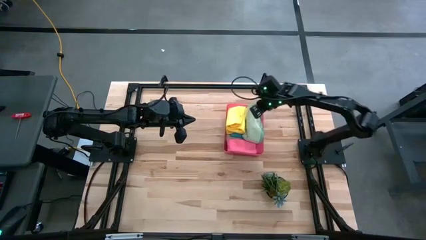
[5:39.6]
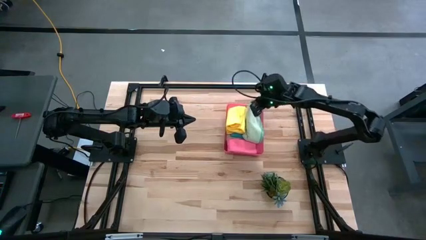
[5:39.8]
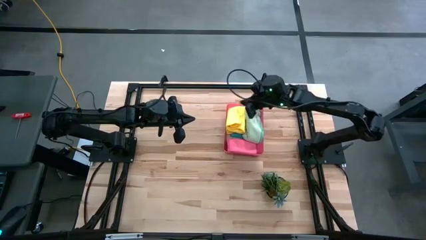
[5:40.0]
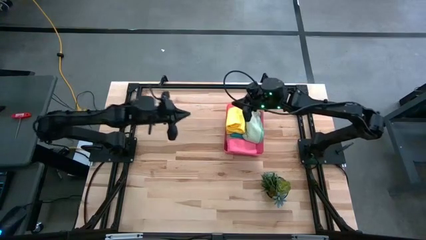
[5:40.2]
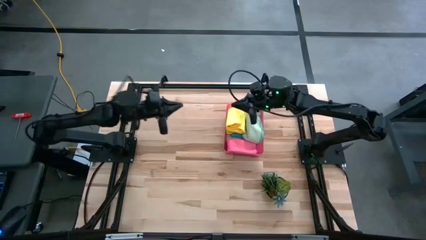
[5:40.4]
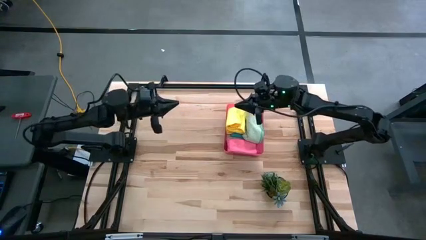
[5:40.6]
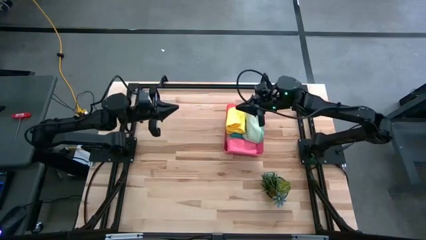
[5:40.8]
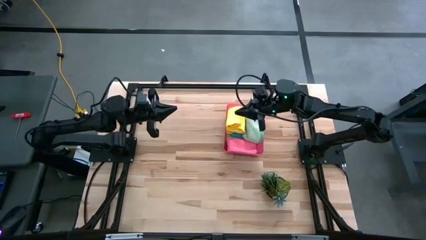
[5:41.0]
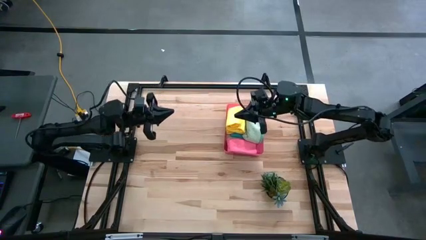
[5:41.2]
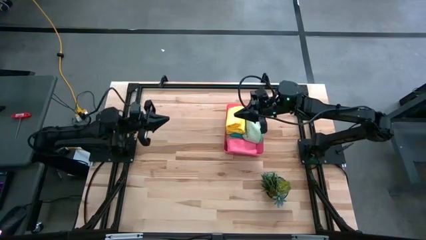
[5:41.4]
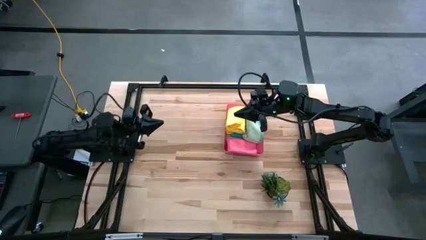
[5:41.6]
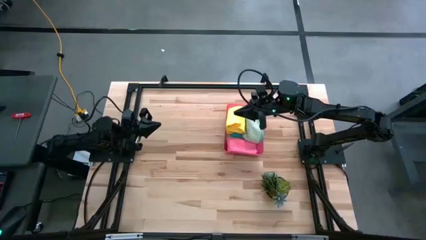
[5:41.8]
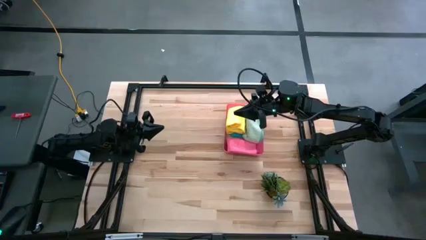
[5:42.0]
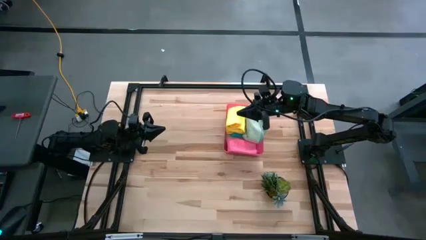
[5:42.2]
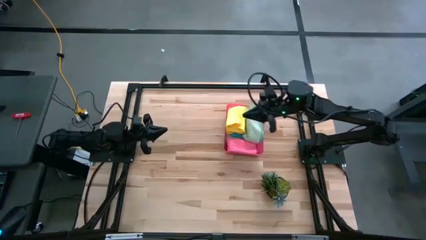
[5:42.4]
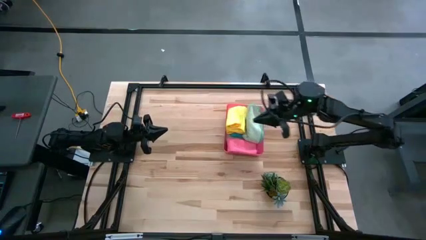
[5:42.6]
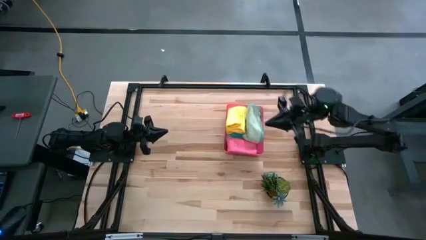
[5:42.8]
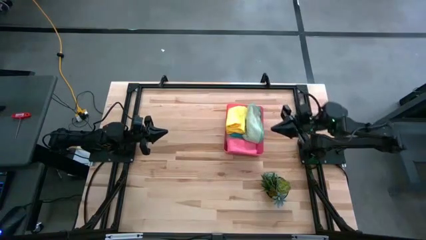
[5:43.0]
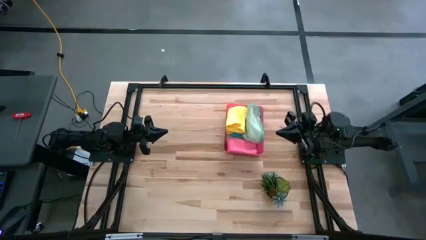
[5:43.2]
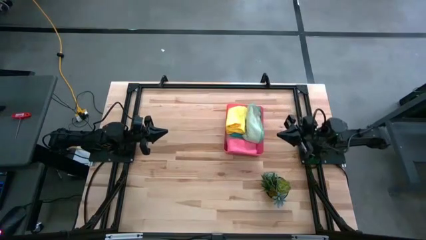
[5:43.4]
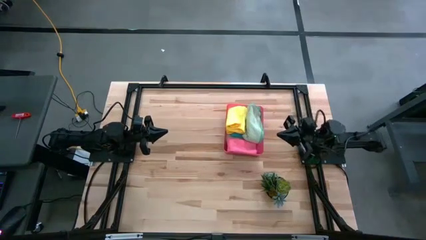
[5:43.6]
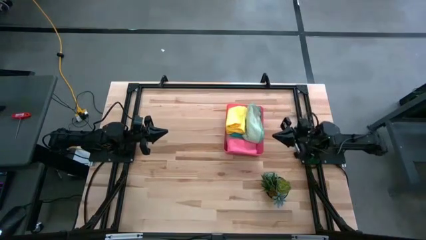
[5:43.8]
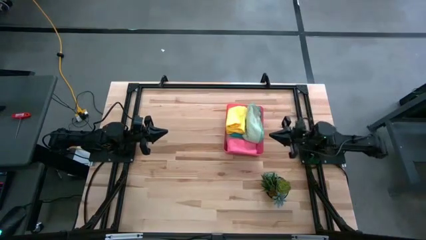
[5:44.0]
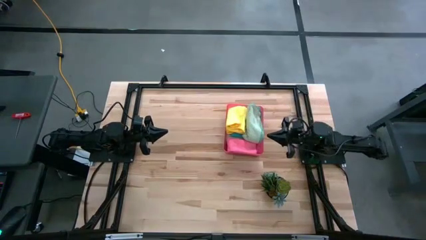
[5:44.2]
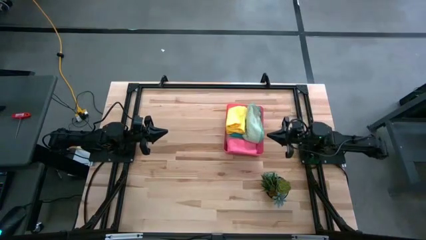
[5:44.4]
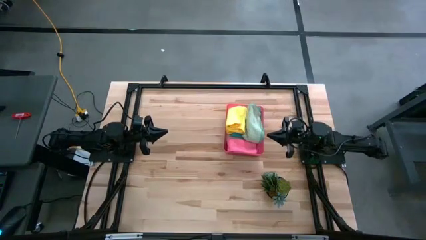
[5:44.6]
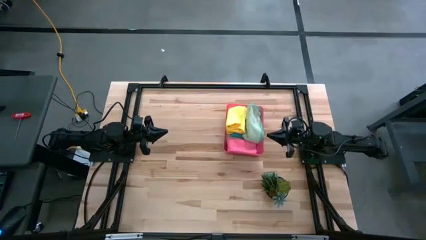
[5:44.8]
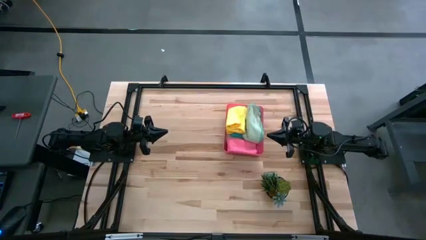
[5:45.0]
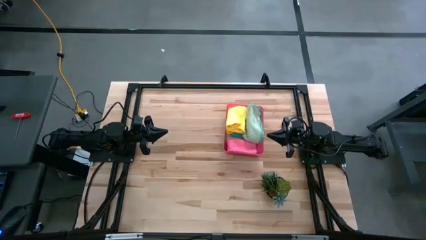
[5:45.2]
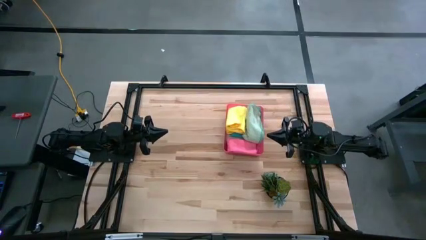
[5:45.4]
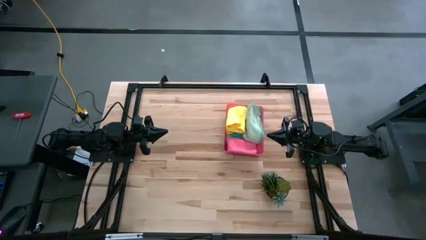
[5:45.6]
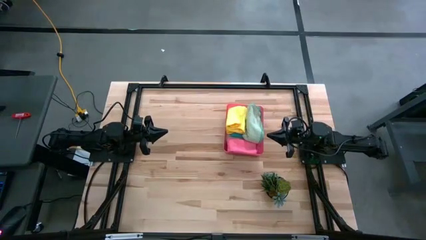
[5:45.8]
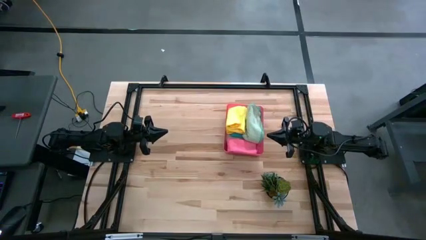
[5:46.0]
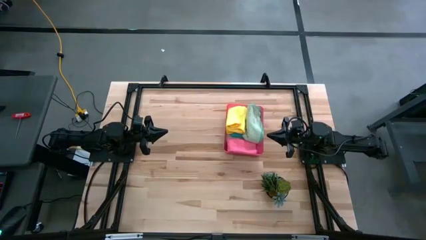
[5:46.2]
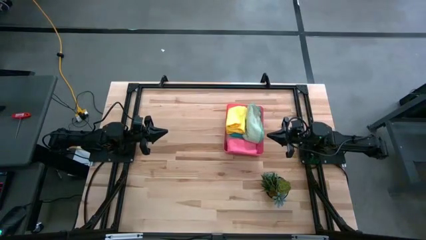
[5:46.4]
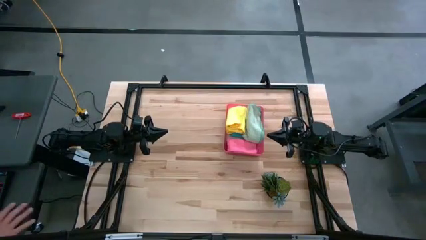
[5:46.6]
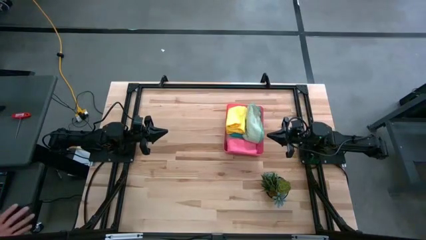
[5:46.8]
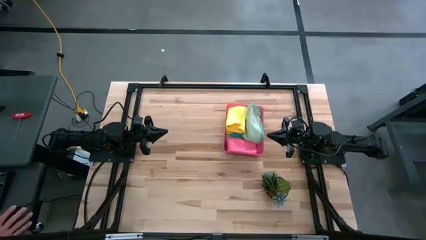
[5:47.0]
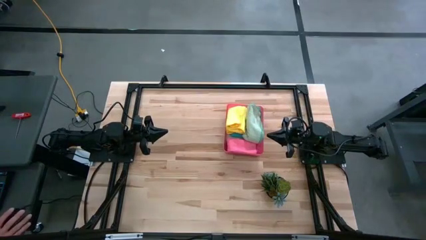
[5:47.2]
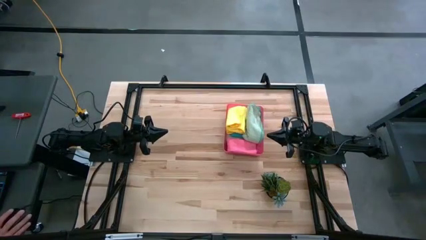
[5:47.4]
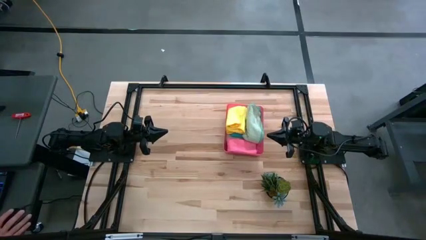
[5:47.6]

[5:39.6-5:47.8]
Task: Fold microfiber towels
Return to Home position

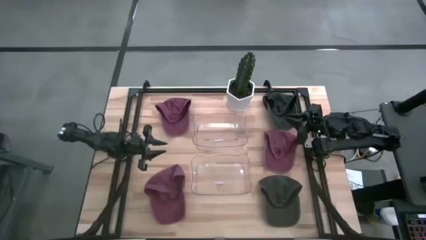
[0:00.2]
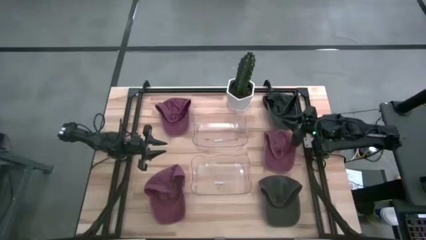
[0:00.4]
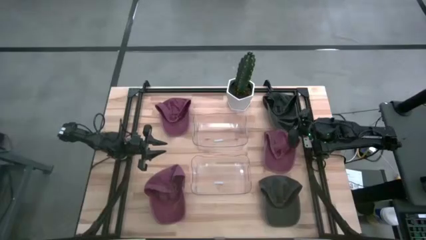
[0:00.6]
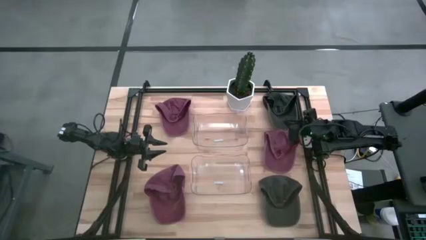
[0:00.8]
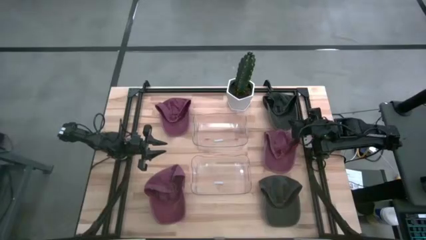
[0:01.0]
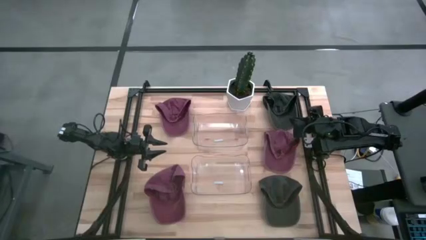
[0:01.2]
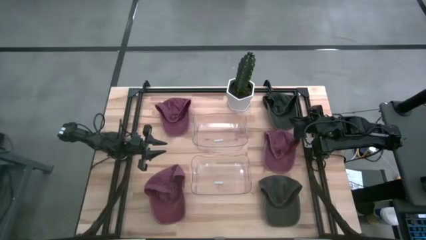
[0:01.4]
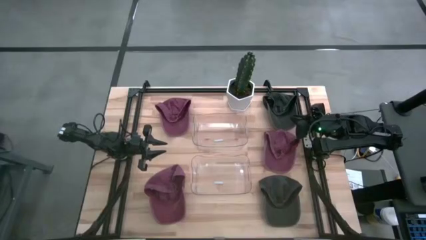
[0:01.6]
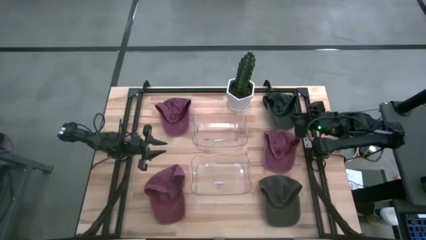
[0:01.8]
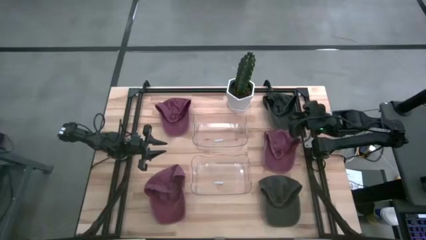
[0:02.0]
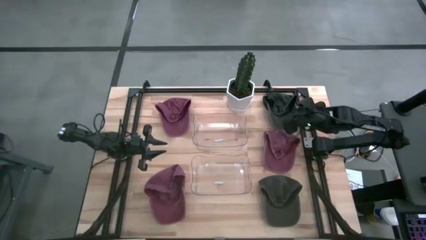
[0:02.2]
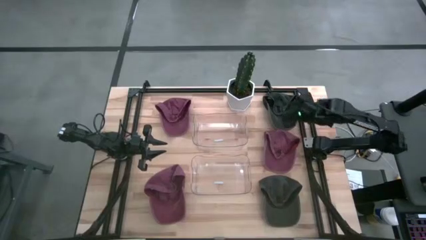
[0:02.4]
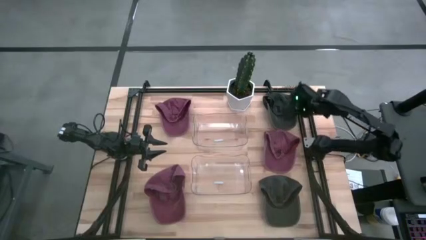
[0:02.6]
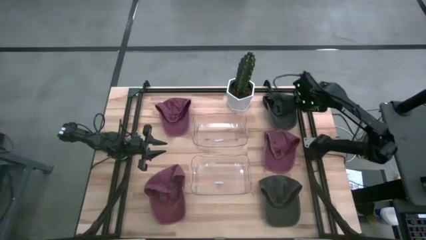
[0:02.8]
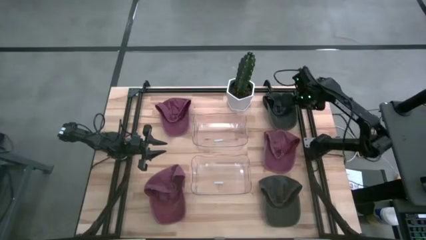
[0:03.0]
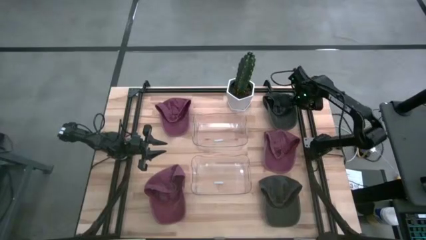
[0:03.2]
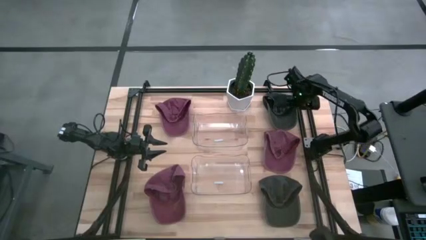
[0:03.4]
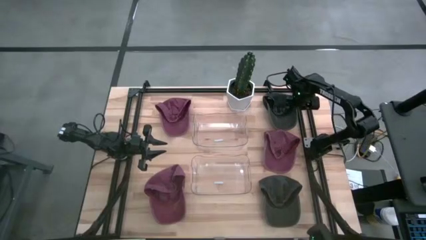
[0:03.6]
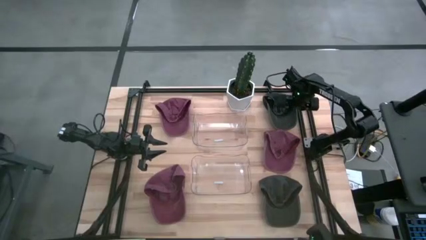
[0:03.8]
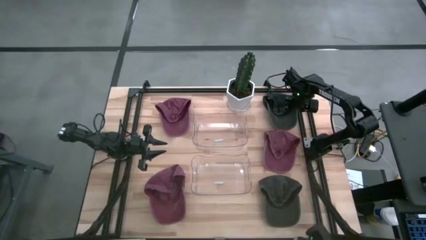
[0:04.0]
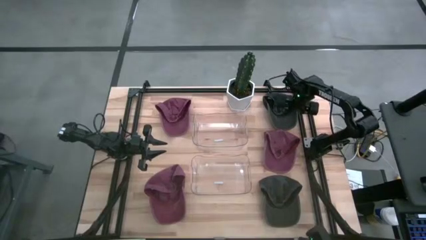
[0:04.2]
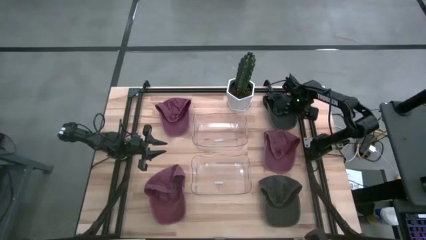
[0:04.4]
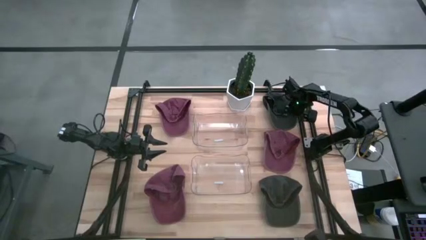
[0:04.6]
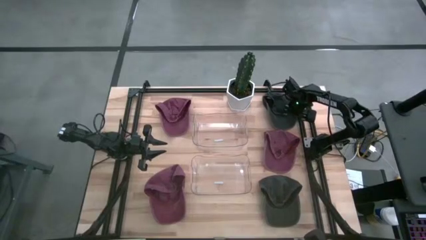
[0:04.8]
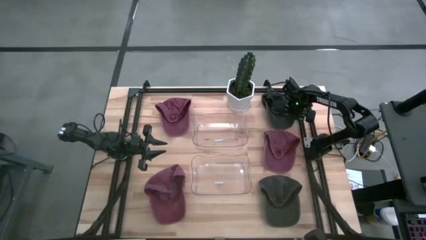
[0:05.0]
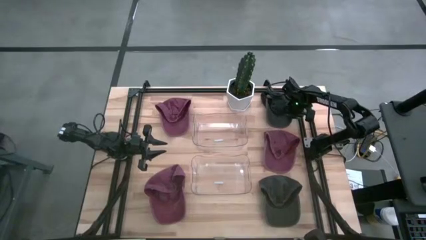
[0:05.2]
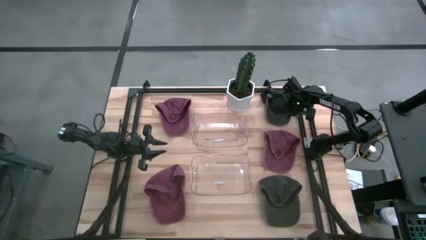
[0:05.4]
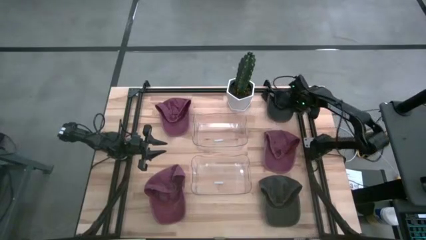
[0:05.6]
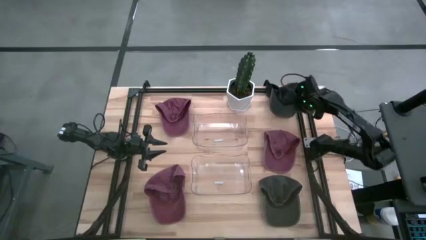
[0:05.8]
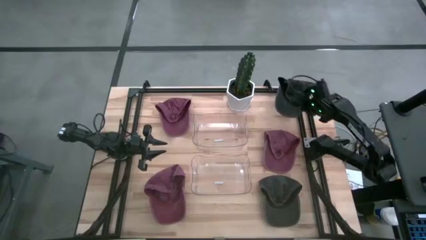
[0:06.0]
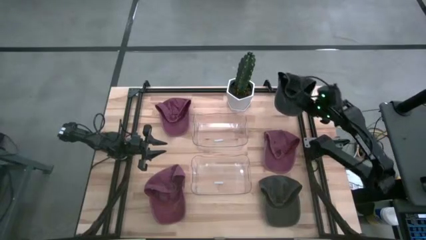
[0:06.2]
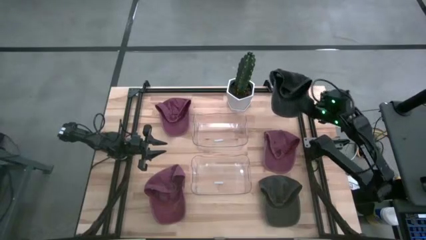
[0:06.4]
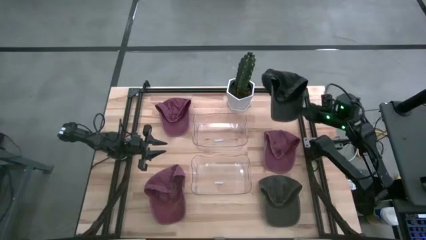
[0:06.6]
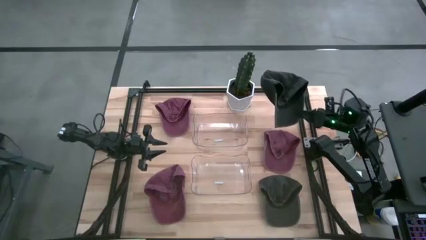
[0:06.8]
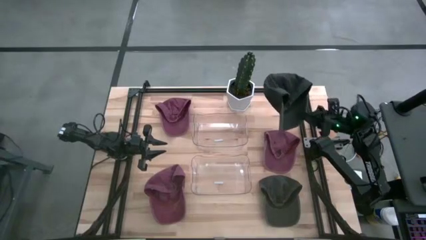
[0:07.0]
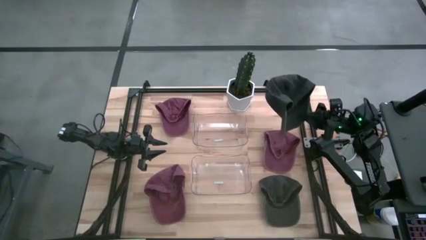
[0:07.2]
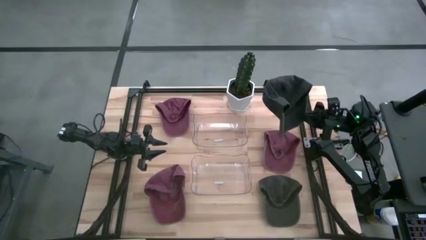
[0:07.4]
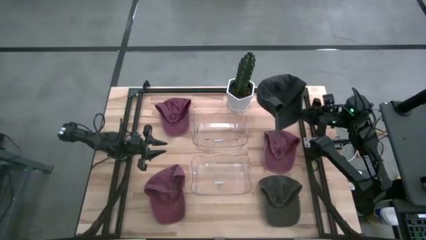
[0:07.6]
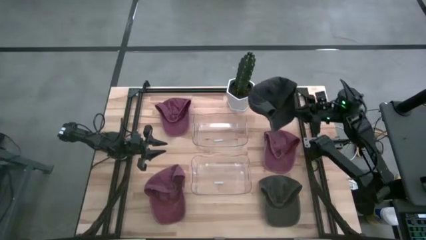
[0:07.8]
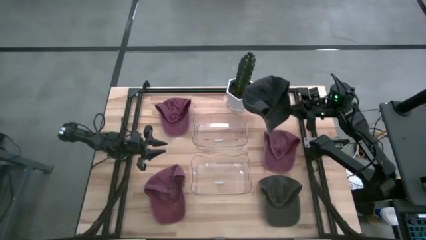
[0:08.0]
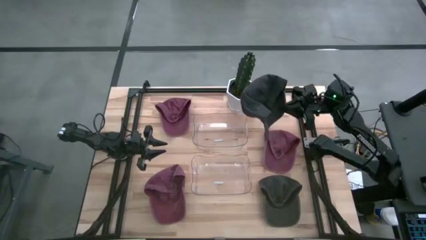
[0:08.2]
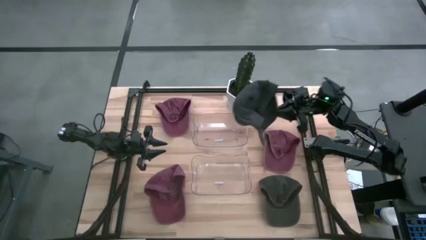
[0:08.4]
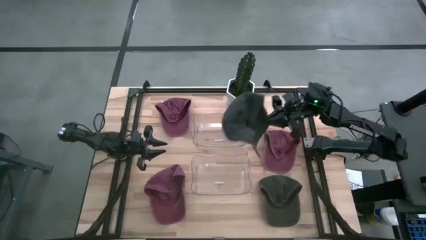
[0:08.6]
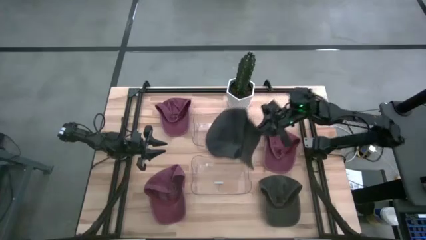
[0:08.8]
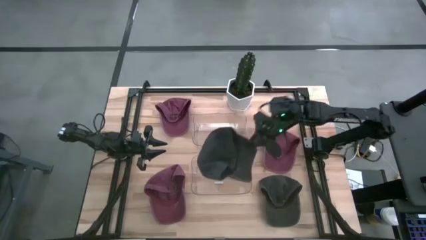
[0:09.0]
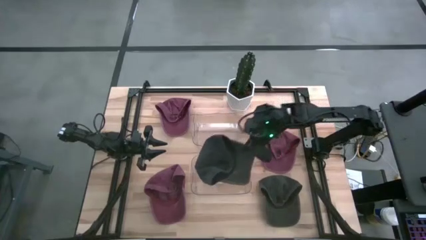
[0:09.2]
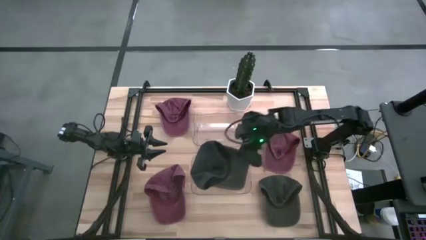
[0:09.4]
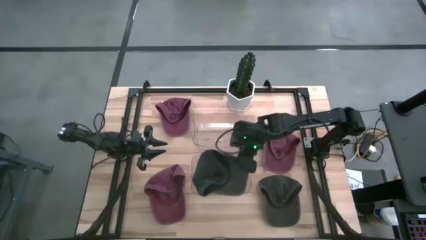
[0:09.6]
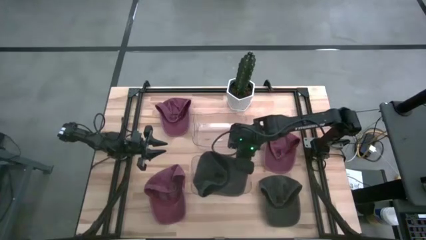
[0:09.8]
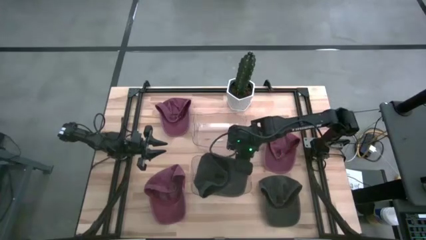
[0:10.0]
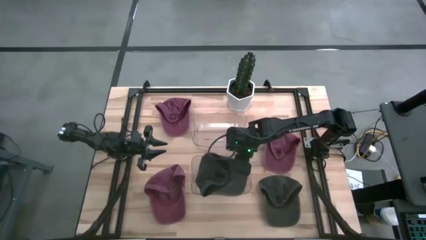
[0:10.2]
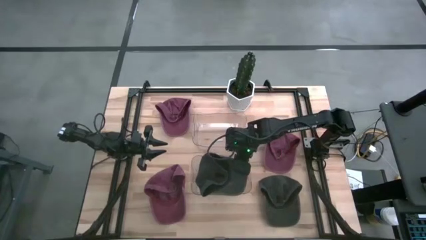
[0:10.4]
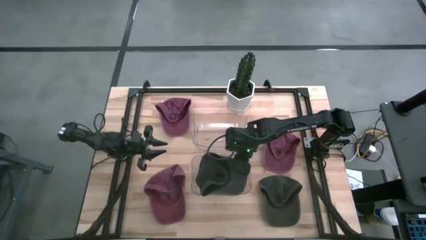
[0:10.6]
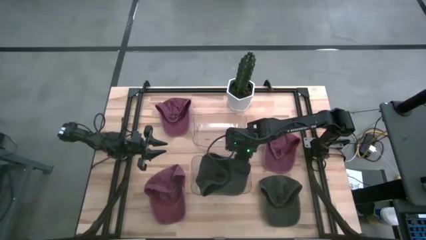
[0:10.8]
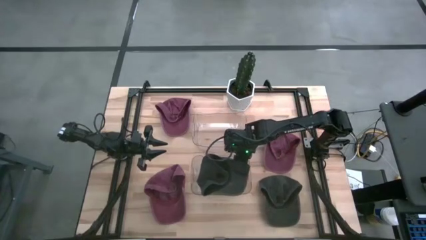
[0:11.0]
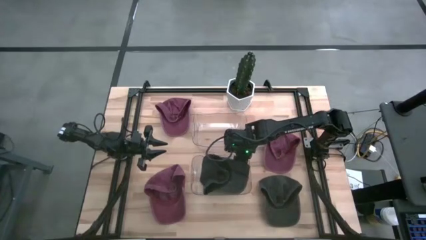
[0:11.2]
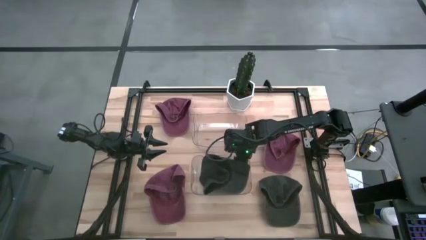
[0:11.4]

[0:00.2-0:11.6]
Task: Pick & Place hat
Put the top black cap into the bottom transparent bin
